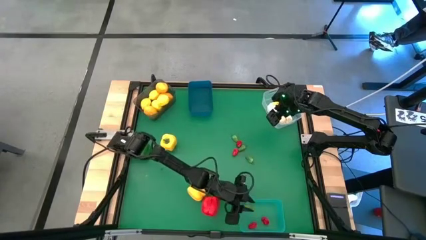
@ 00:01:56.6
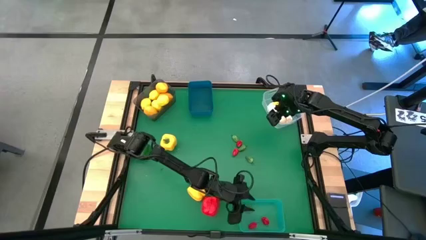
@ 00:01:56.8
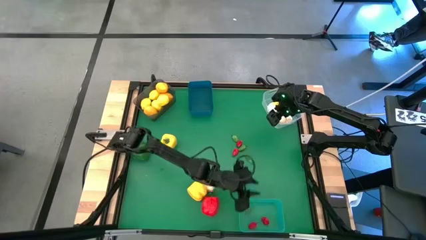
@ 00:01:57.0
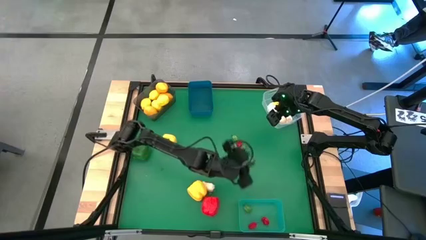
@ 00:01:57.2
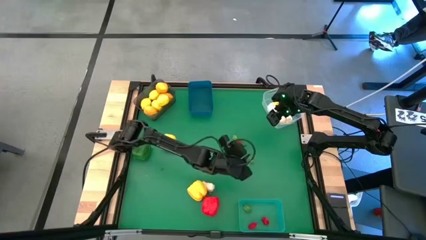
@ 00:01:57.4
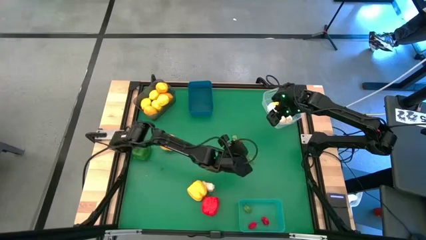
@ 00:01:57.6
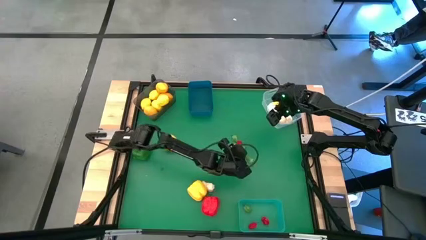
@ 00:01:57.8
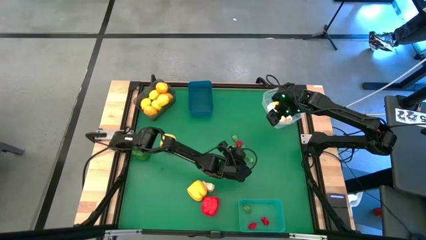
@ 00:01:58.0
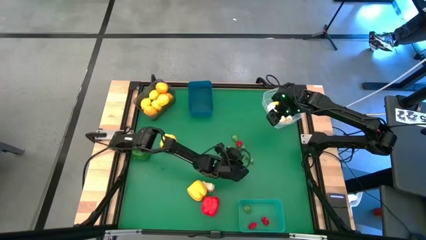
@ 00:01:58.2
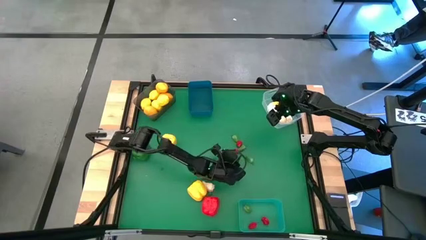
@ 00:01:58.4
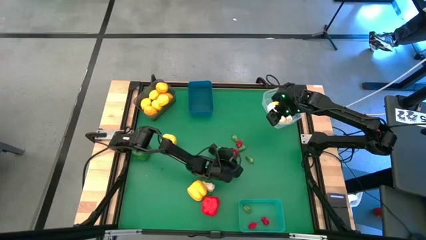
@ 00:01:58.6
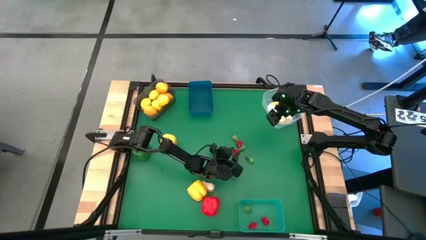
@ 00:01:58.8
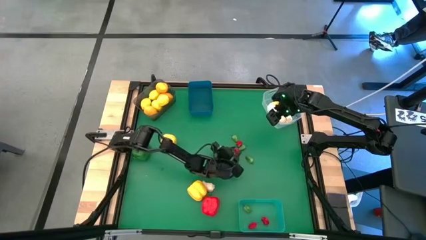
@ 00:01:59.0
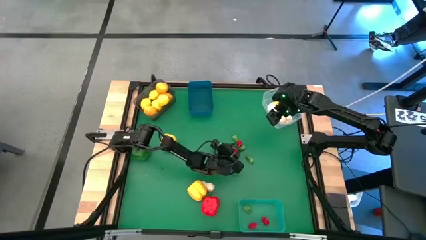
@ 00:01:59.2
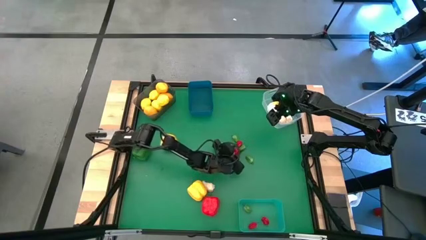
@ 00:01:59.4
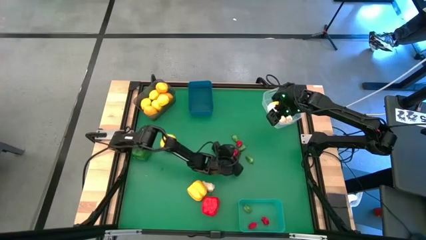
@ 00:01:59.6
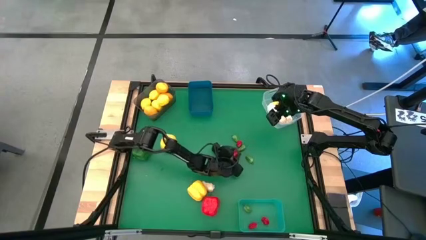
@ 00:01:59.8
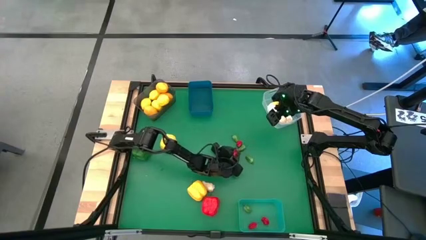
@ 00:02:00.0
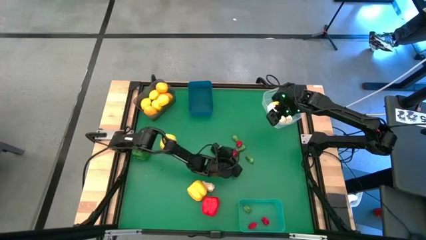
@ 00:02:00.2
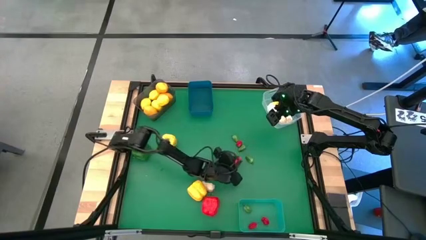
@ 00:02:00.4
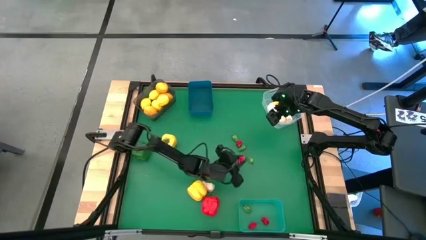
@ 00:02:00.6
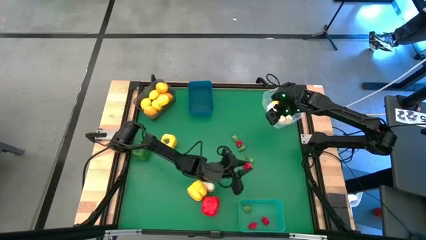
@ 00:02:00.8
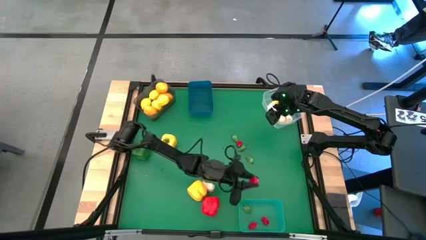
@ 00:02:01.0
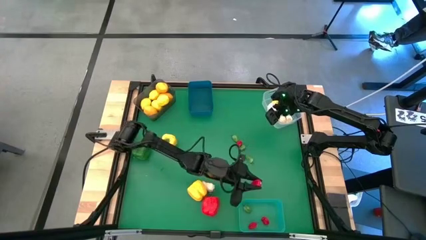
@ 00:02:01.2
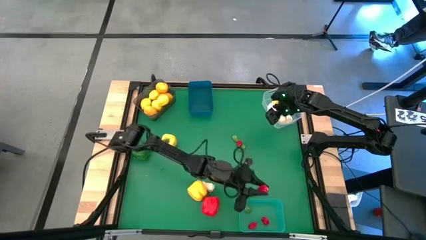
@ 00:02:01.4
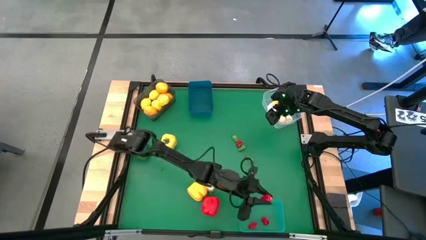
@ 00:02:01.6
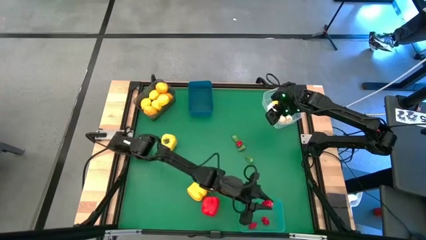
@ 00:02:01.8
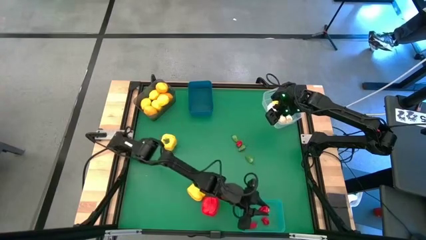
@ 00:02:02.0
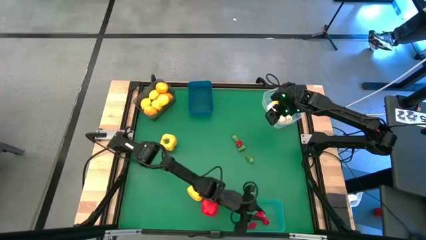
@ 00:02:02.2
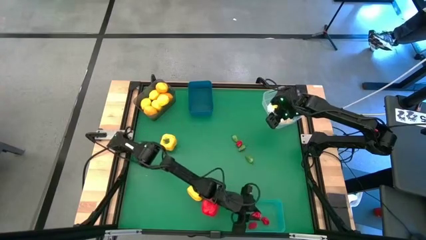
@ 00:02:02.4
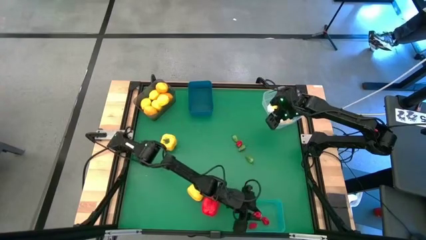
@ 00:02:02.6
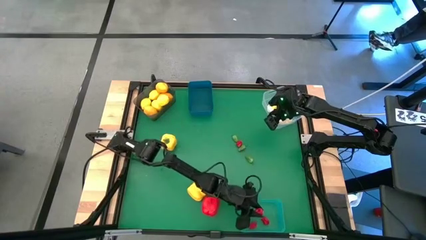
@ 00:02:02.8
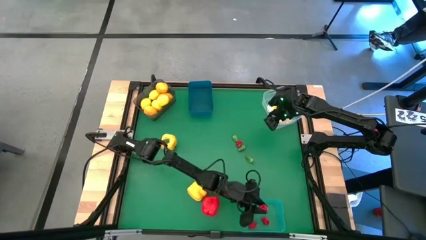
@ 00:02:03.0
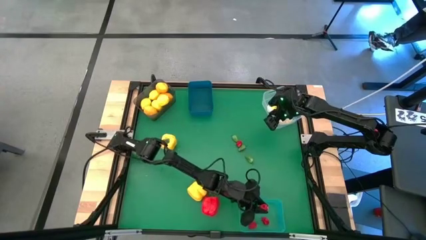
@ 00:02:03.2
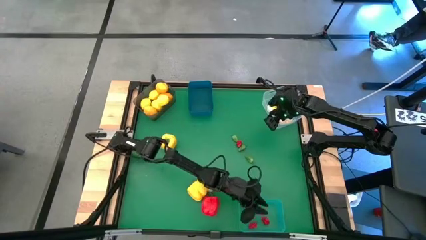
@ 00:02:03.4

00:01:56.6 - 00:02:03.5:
Task: Sort produce into baskets
Put the bottom red pepper into light blue bin

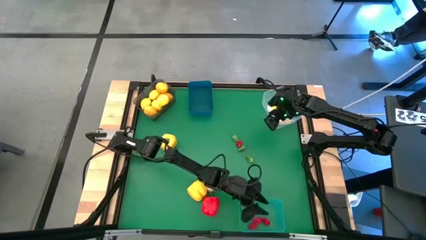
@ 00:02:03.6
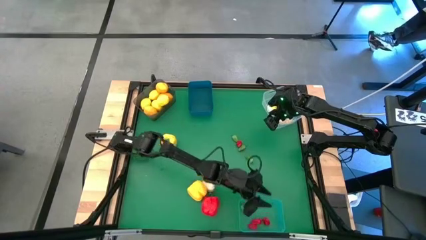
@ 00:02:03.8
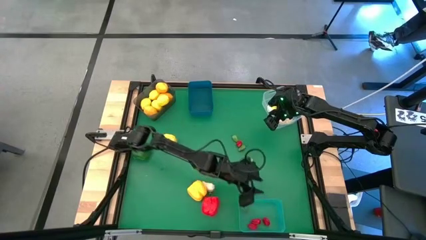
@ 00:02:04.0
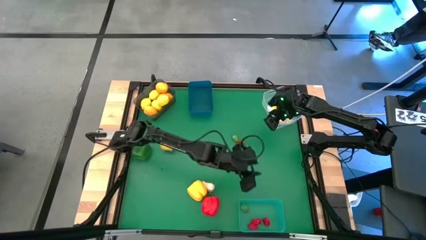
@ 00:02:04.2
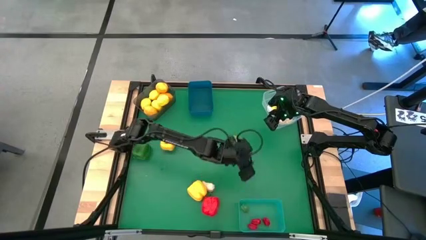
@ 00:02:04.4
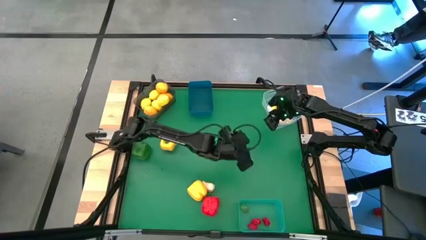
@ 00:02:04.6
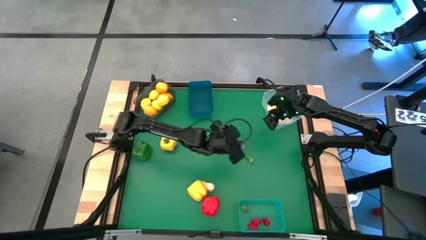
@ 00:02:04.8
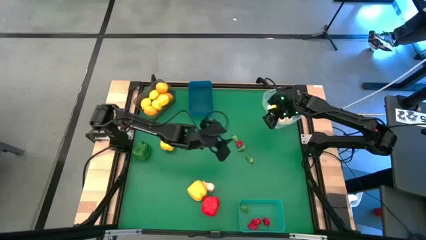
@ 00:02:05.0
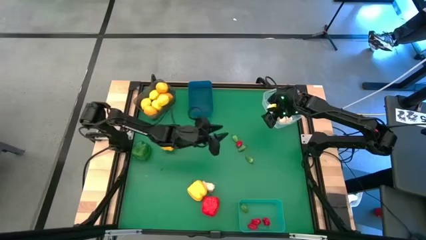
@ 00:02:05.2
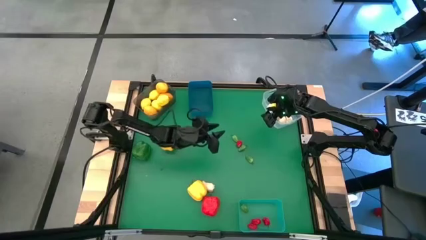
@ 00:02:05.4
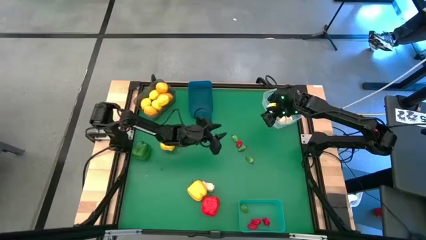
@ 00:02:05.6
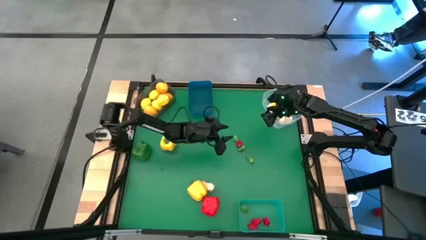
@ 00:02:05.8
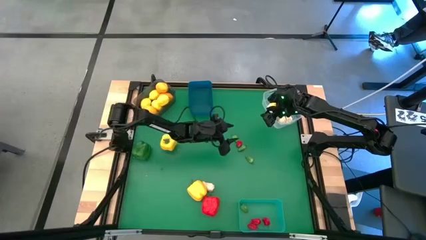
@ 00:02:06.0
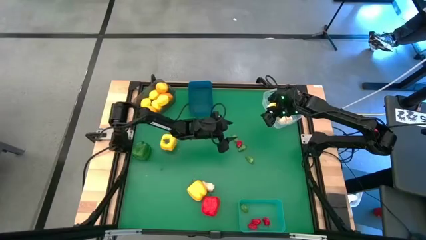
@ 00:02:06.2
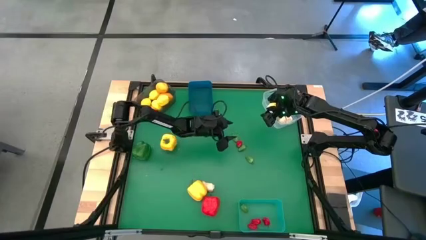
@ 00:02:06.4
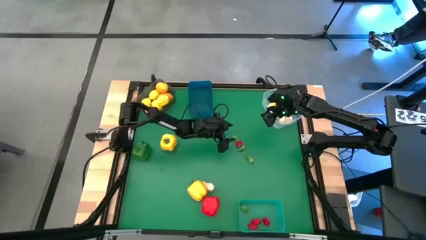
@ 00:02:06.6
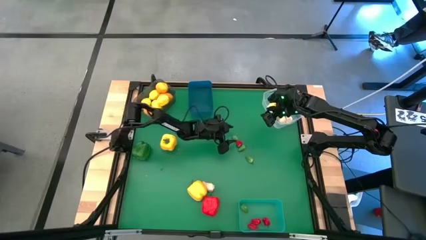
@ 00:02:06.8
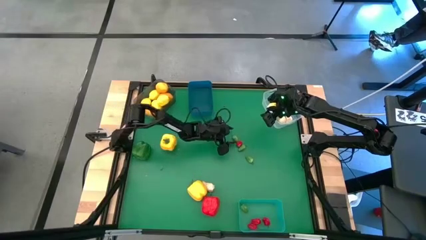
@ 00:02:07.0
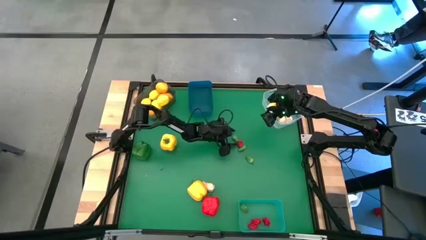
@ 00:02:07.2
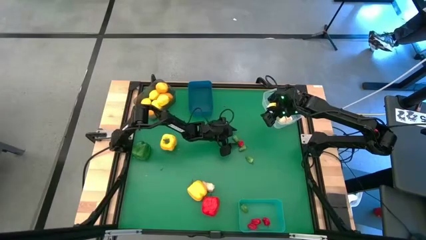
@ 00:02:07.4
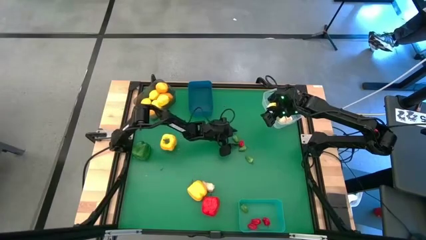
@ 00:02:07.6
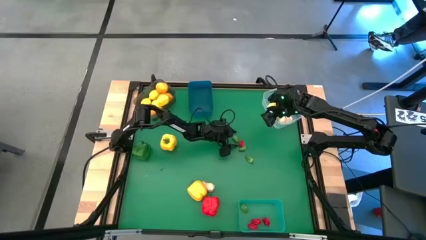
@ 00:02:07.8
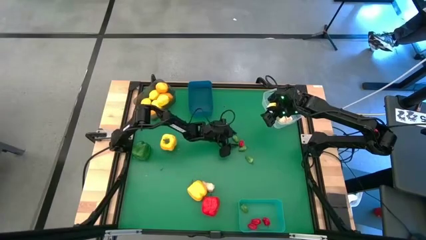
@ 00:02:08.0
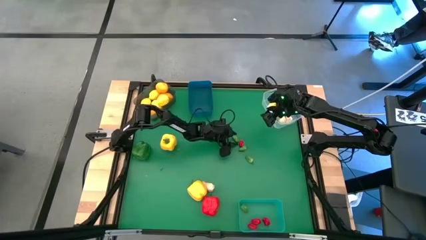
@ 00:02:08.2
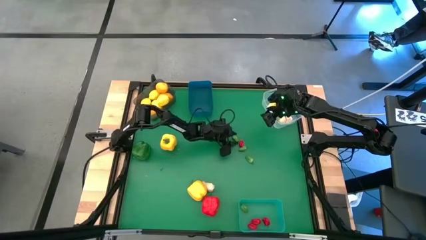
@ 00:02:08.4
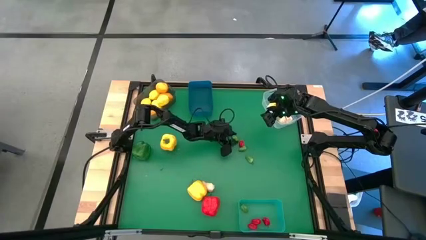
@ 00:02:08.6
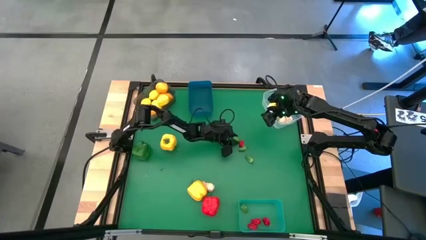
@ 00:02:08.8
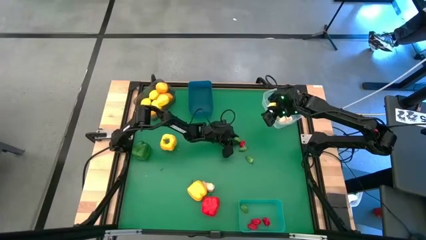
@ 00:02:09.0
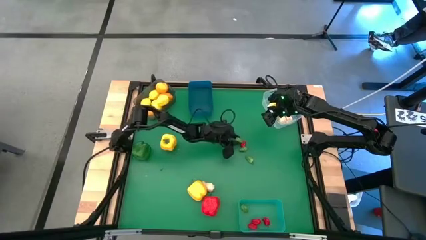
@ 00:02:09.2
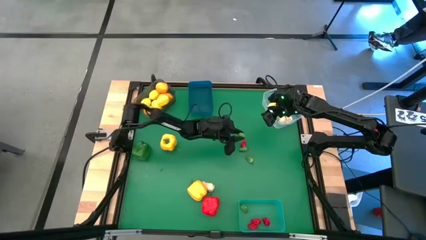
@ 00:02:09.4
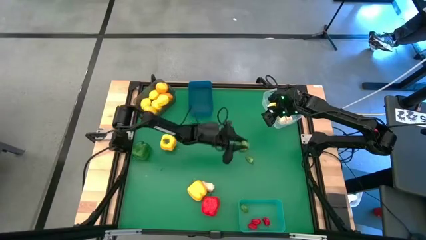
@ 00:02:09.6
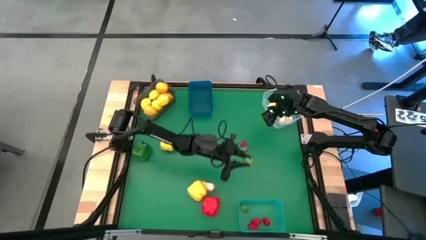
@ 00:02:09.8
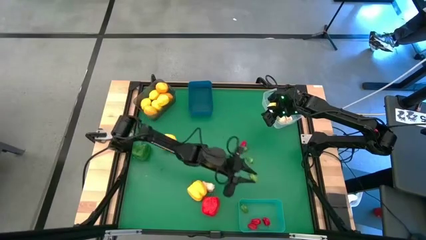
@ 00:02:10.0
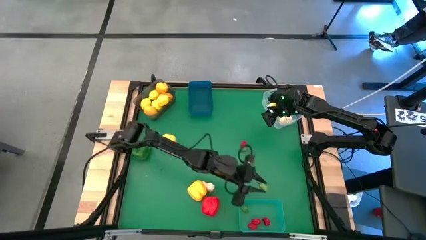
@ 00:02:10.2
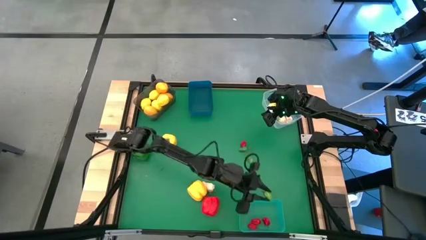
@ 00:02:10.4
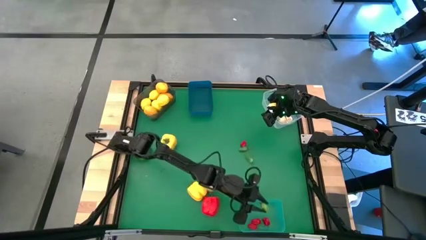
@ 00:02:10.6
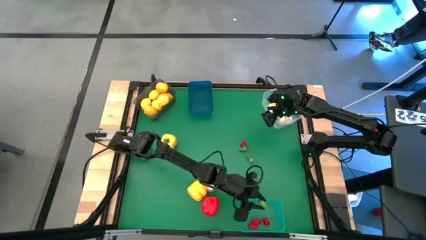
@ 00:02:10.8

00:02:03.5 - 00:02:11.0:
Put the top green pepper into light blue bin

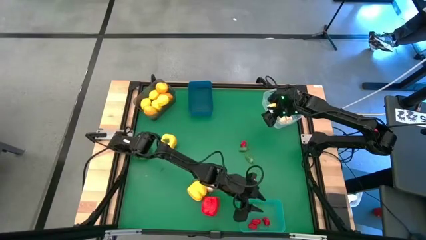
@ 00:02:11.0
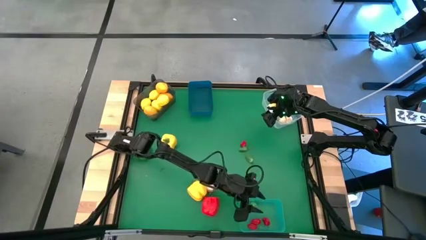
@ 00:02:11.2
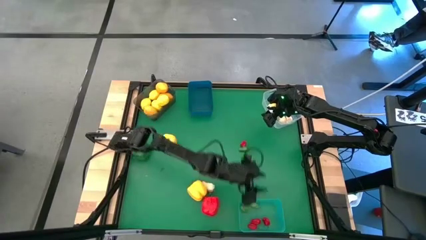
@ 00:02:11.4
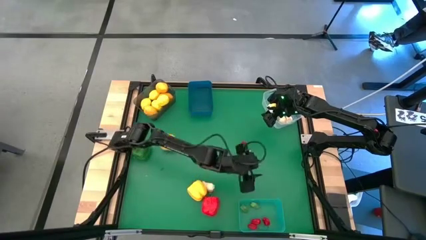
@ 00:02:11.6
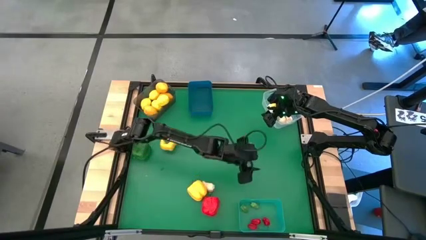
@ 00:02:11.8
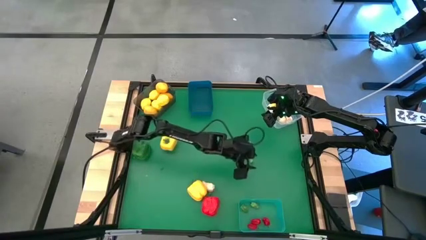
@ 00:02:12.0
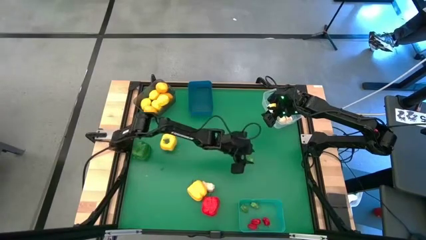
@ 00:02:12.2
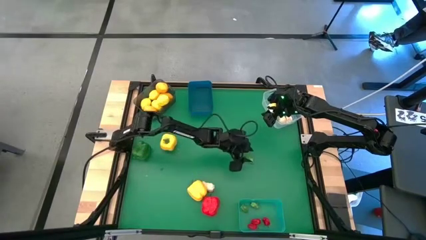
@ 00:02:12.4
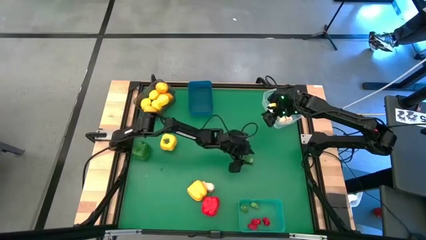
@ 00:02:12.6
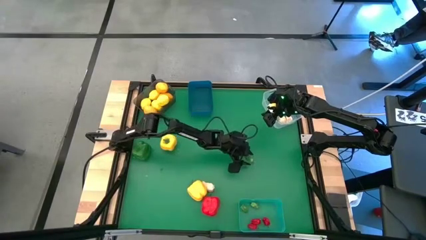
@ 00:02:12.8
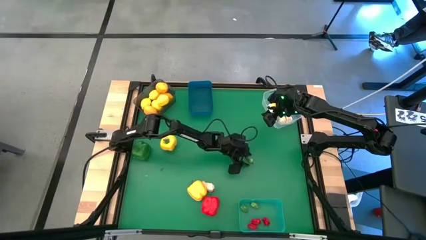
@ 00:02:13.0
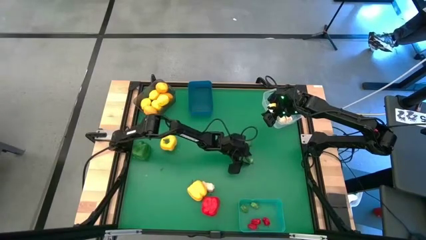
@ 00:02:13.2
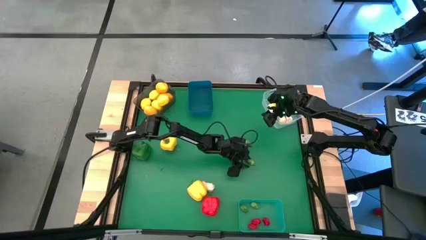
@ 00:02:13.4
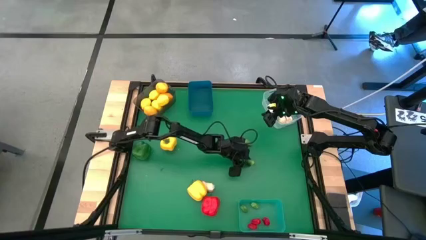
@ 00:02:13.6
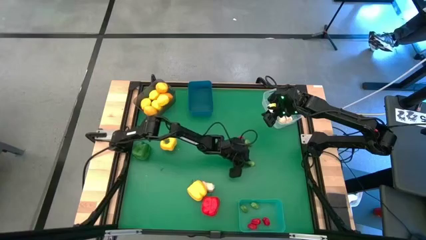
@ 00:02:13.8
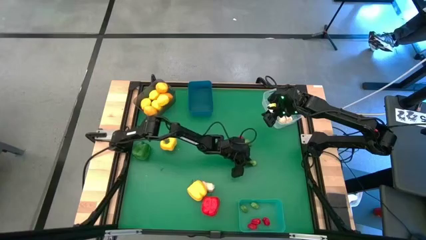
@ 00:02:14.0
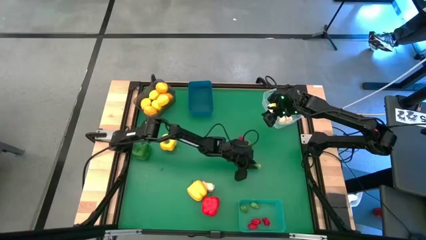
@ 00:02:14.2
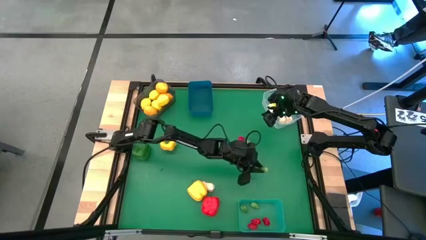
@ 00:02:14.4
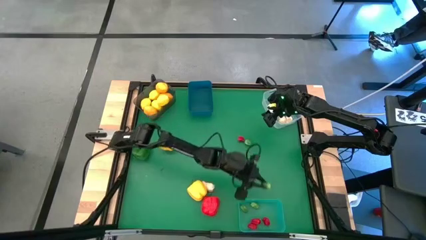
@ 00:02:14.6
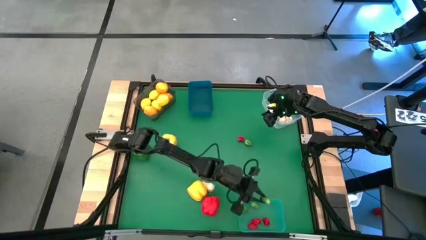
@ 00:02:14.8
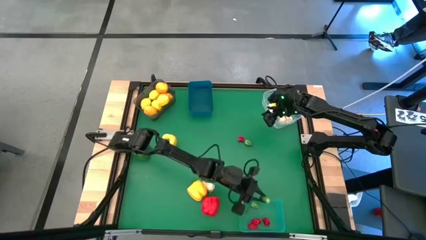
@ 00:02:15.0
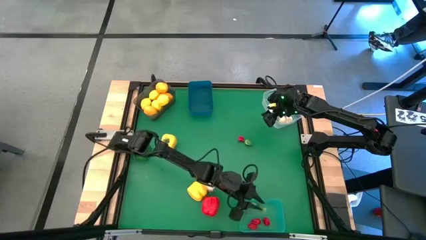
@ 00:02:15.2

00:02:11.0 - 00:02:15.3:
Put the bottom green pepper into the light blue bin
